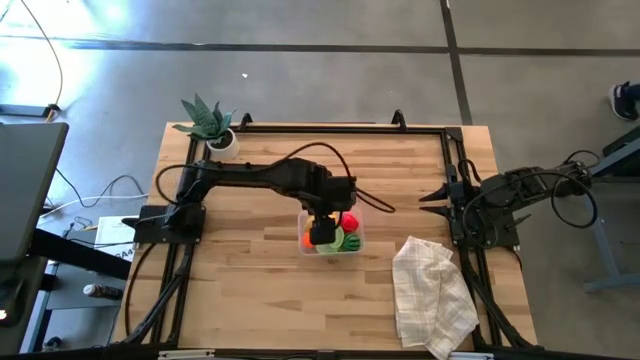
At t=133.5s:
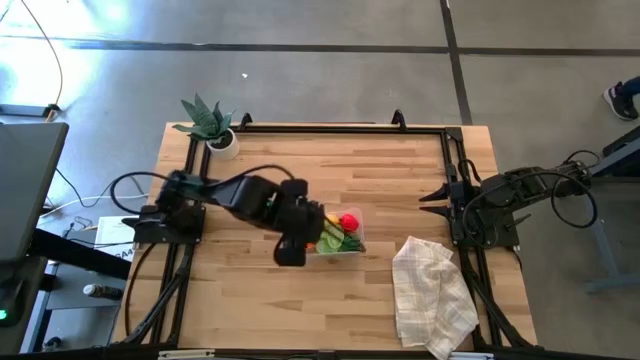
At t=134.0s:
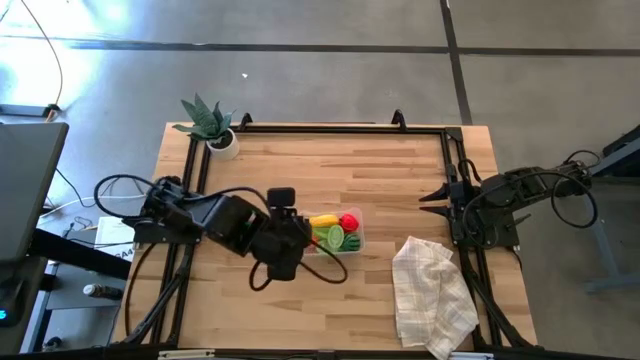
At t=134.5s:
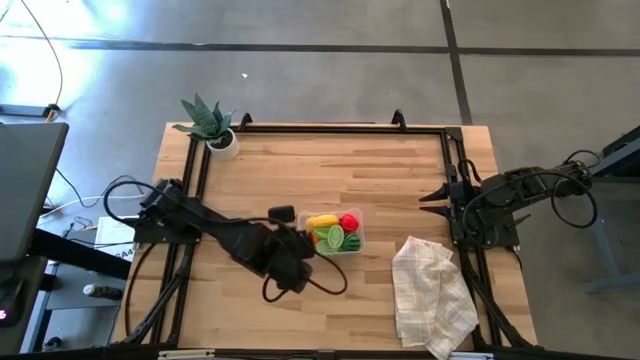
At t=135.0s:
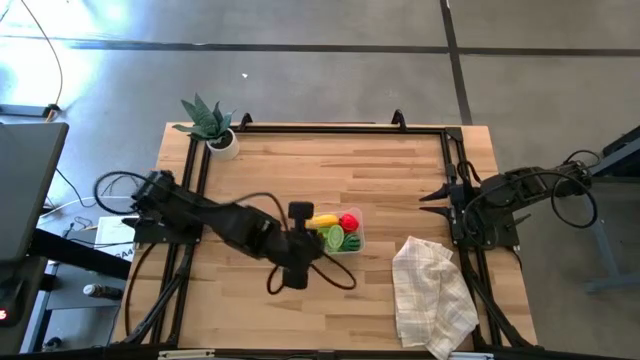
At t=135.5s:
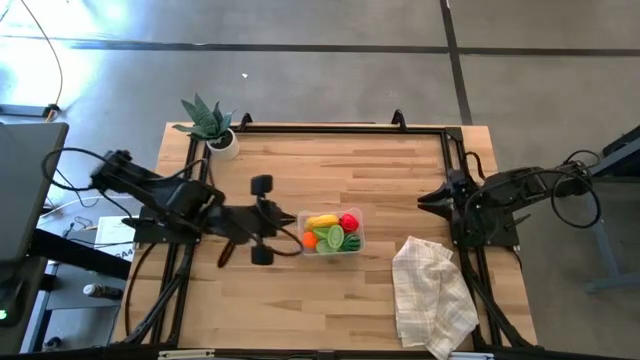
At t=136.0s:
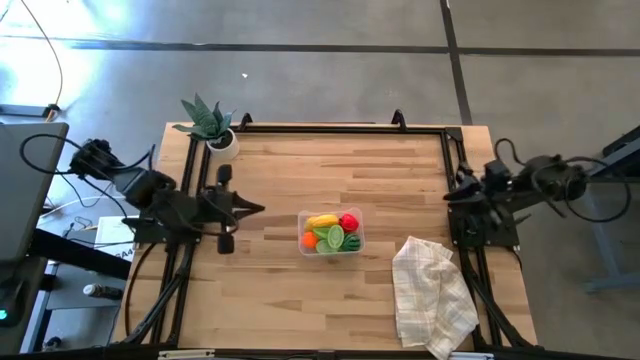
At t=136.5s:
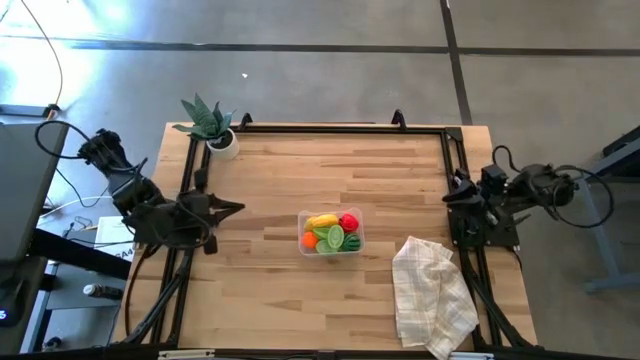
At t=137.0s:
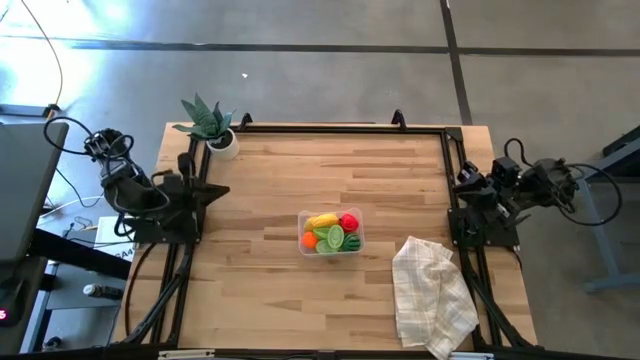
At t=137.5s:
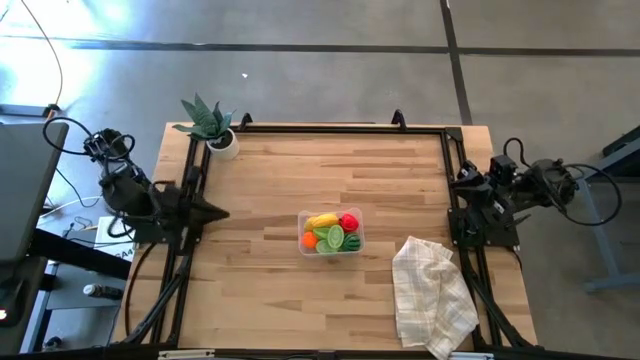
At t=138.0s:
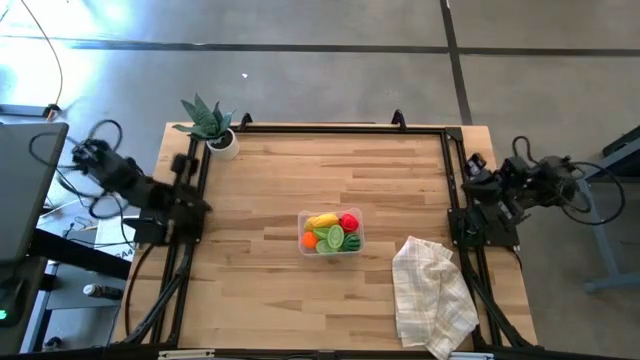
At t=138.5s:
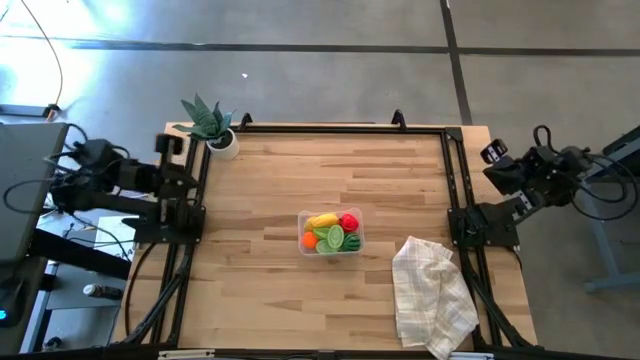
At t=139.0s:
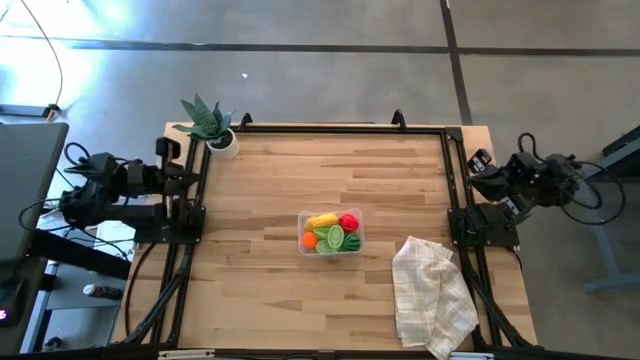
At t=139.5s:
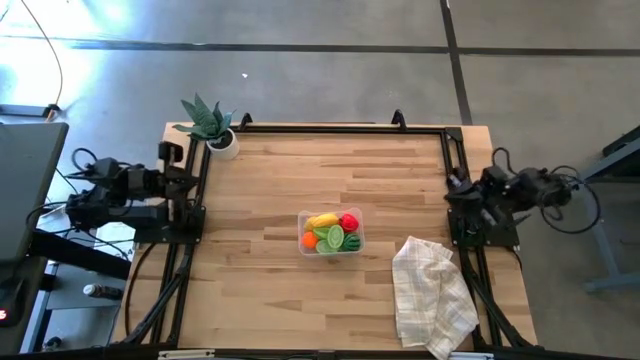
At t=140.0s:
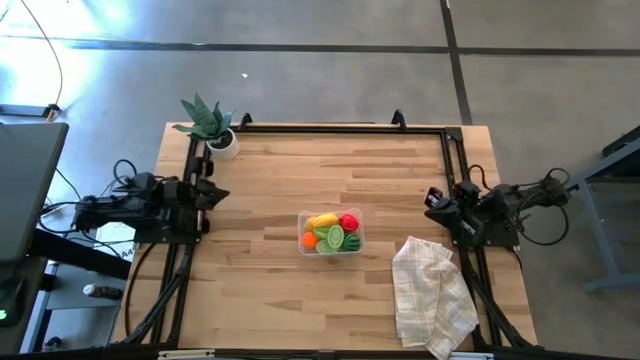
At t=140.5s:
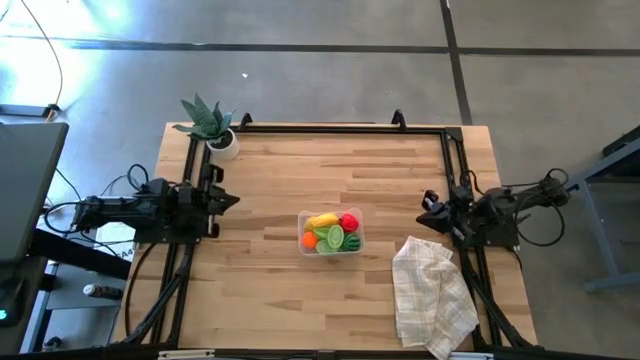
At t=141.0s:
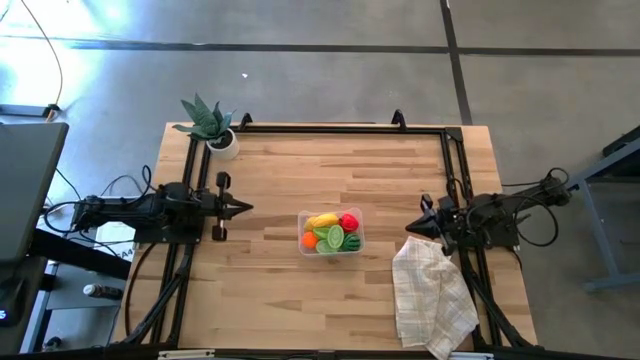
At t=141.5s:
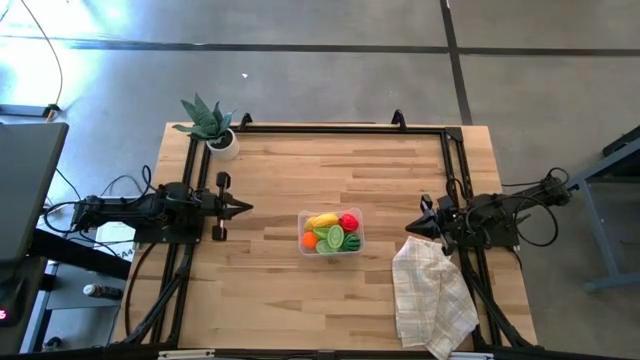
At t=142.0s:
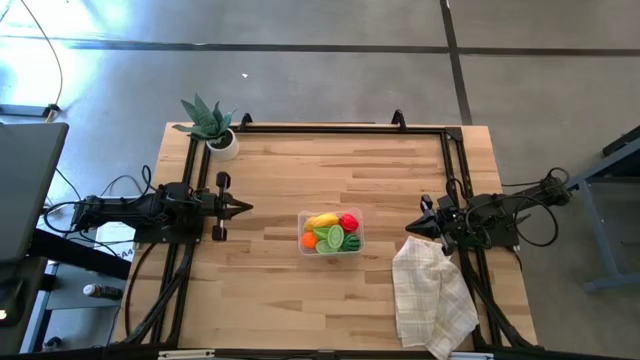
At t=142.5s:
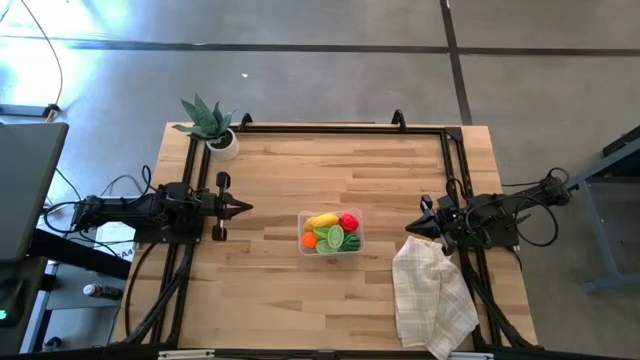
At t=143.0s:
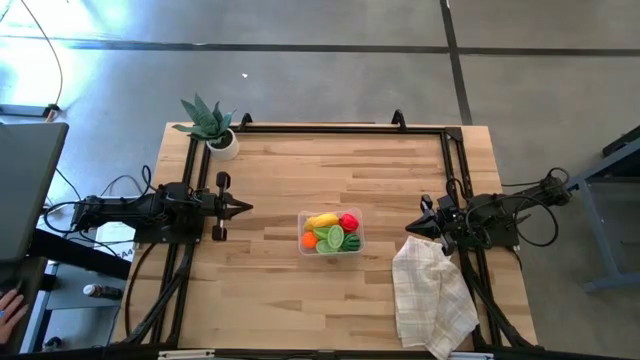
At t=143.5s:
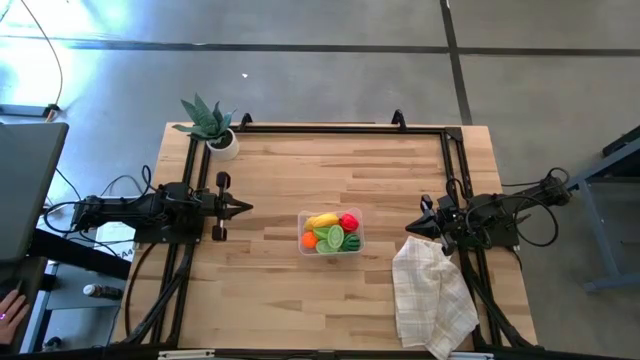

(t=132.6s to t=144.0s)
Task: Pick and placing Produce into tupperware
Return to Home Position

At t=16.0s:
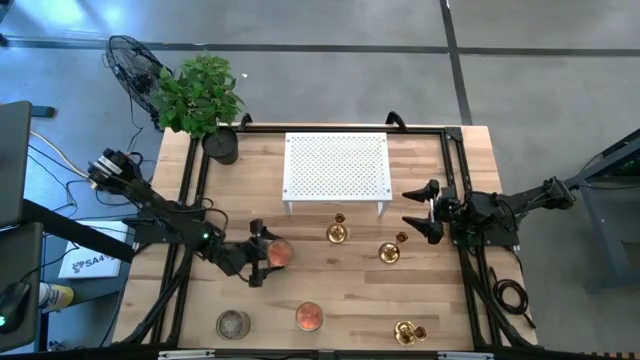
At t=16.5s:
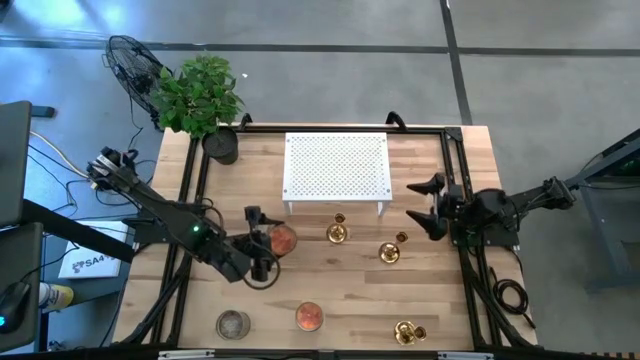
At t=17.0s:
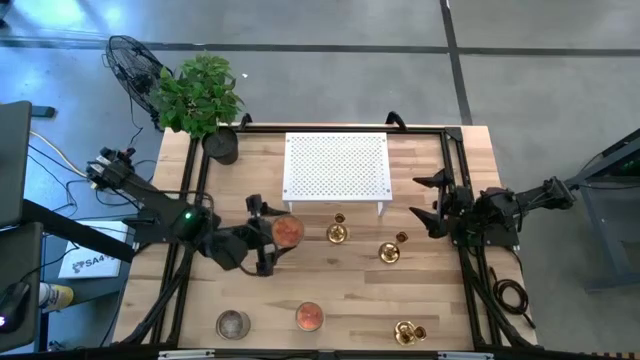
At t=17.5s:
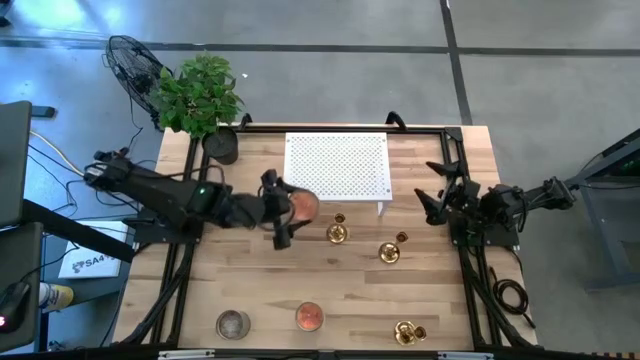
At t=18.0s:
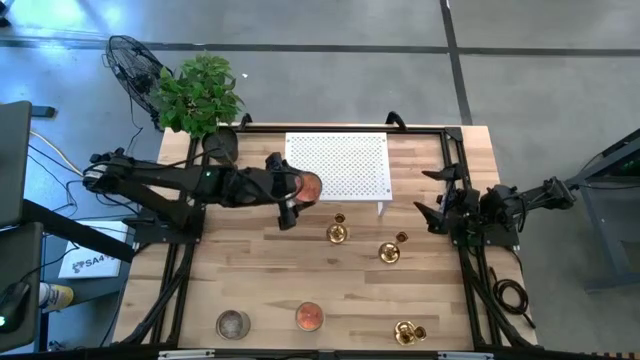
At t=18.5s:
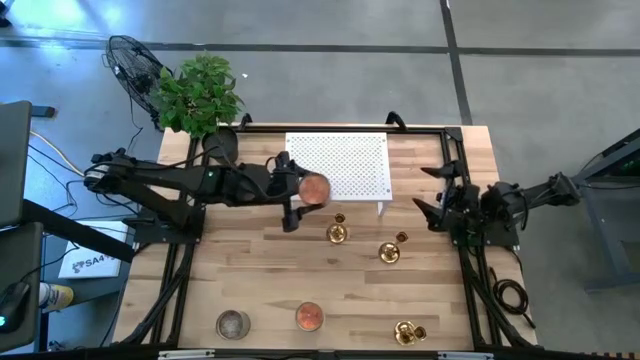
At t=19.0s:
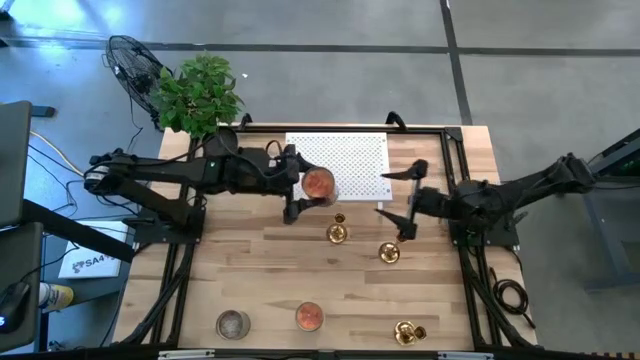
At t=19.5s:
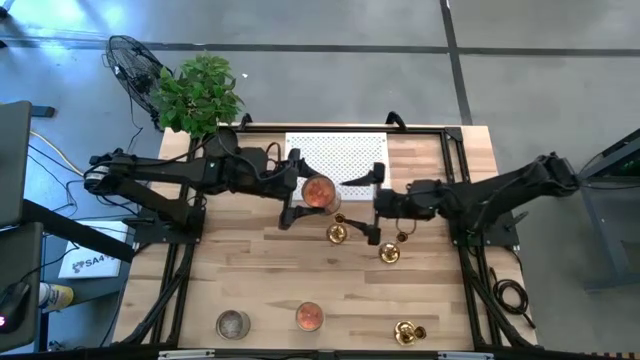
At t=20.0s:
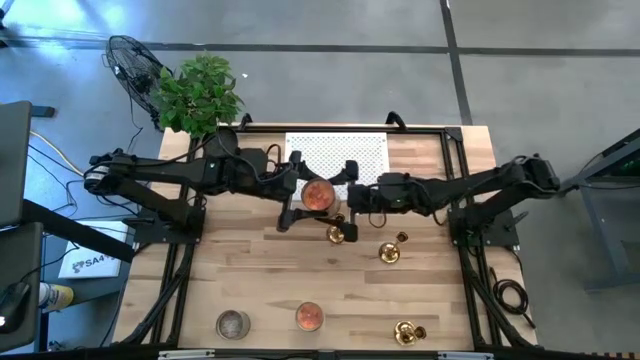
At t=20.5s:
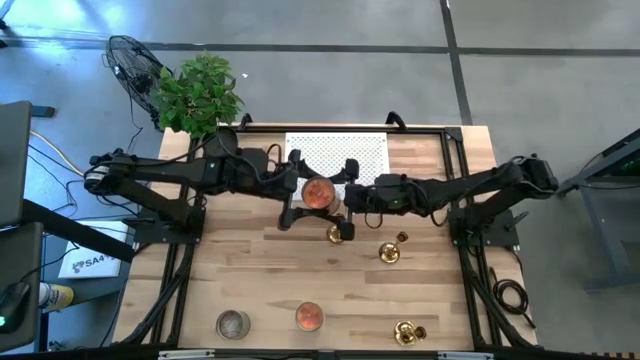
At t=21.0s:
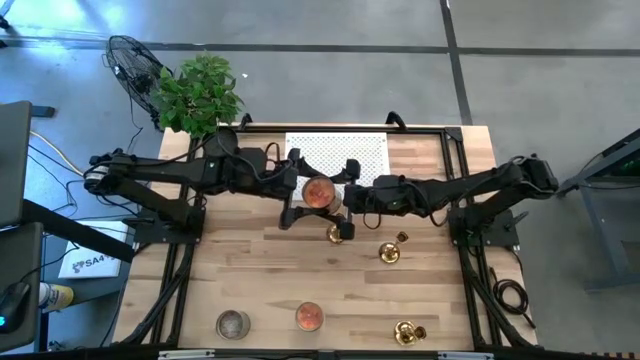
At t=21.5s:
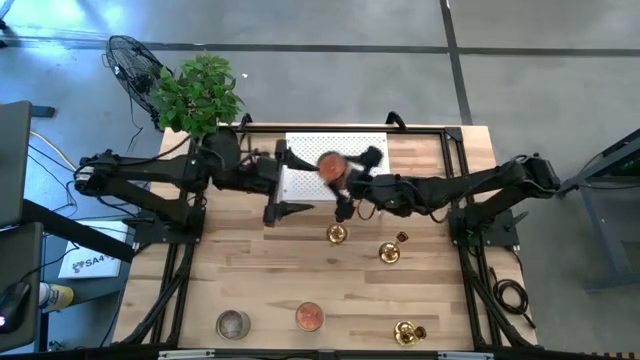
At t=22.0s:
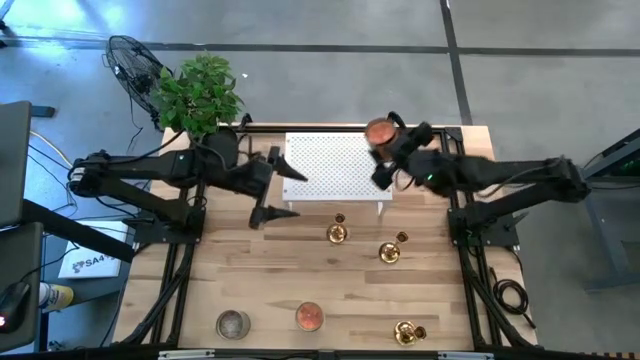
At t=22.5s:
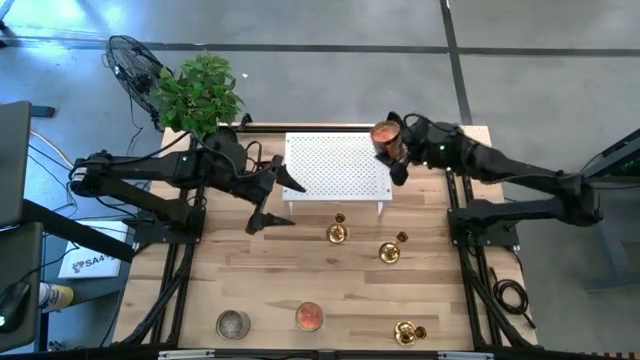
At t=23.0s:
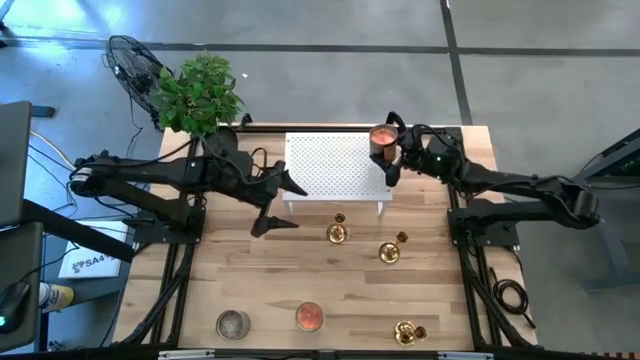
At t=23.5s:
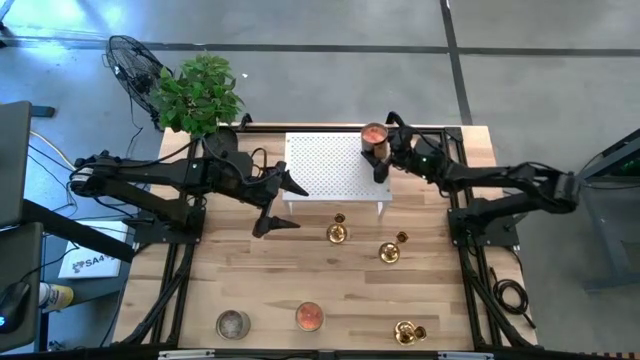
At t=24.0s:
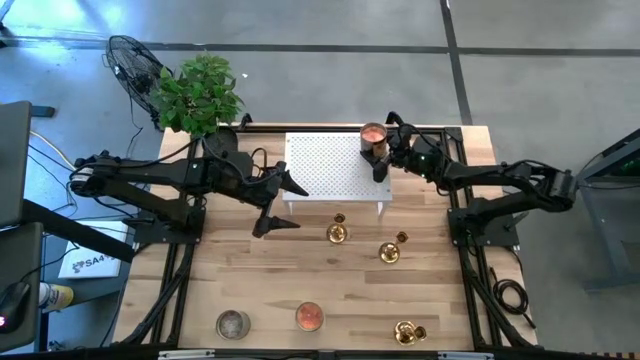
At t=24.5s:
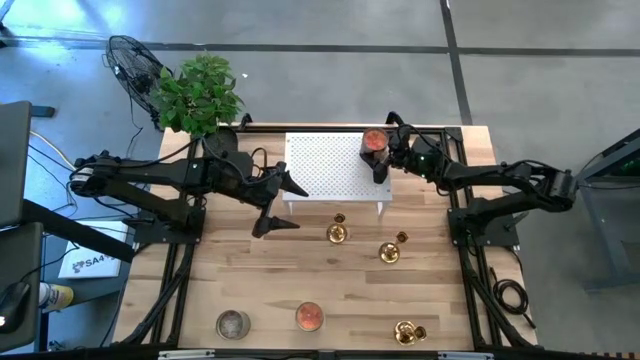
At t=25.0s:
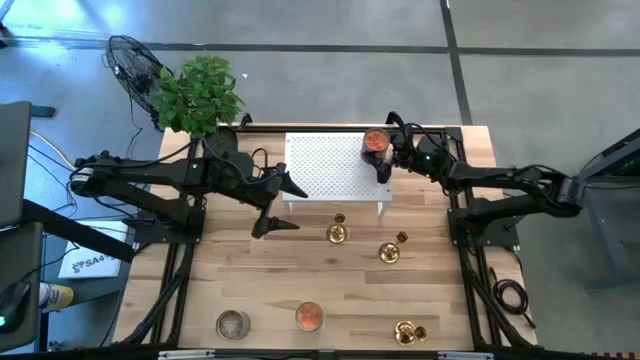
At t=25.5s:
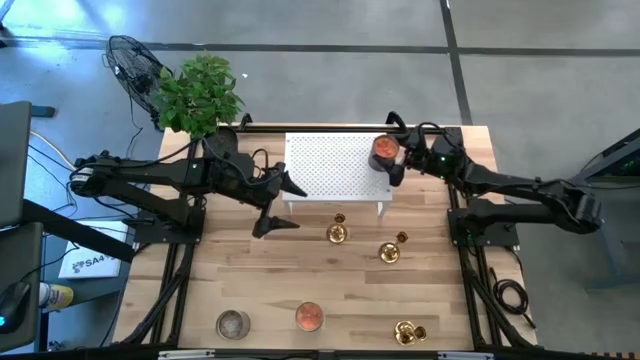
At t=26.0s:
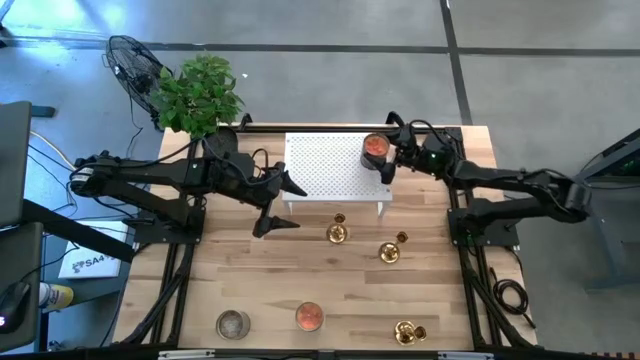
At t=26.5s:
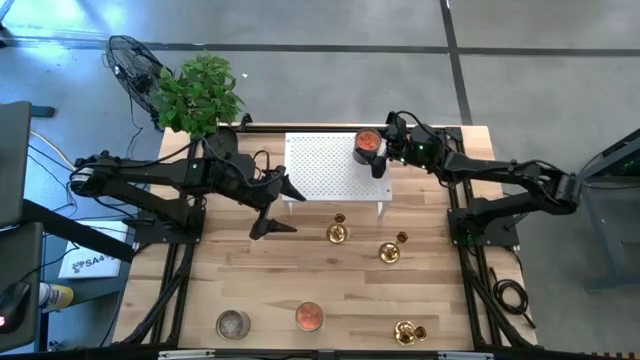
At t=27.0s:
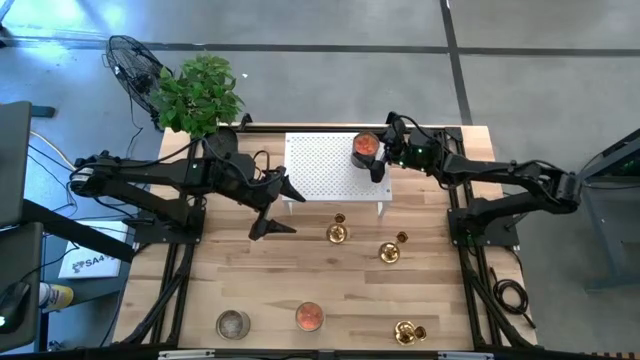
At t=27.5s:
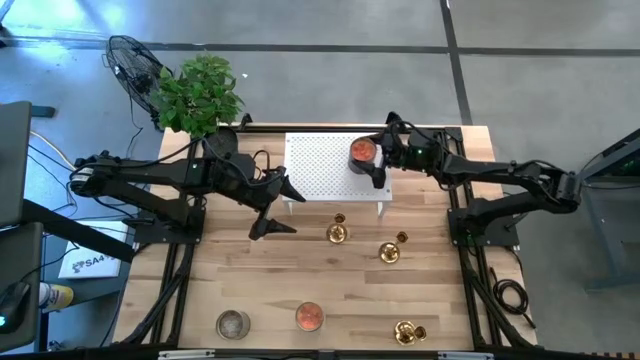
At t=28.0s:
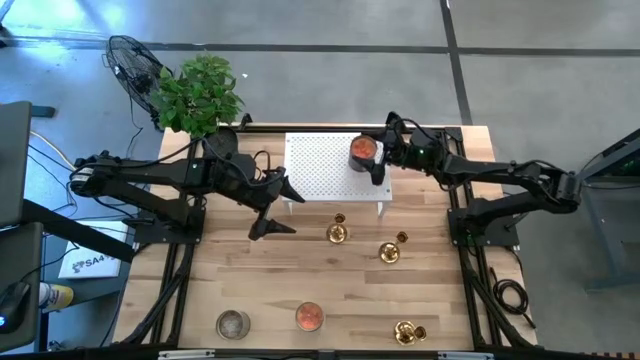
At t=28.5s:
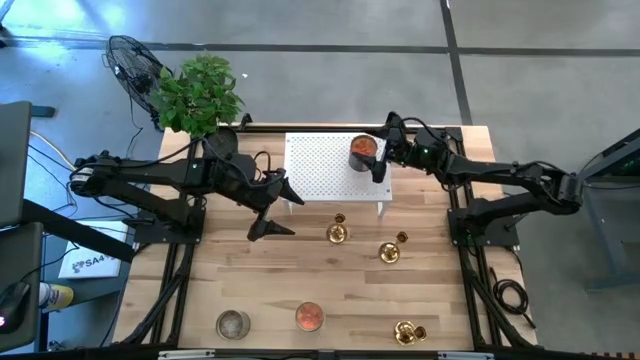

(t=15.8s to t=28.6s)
Task: Pick & Place candle stick holders
Put the fruits and the vegetables in the bin
